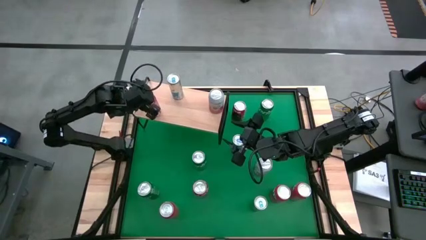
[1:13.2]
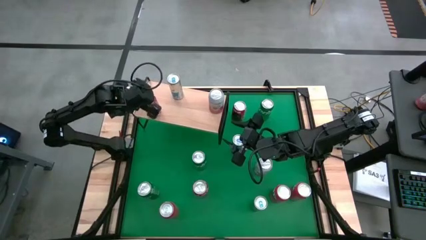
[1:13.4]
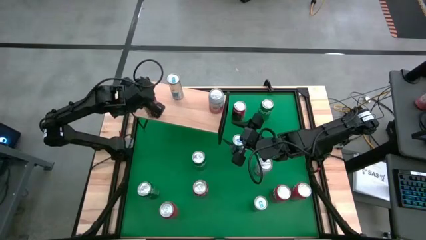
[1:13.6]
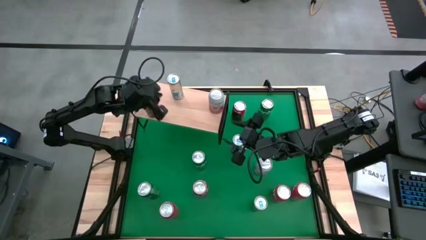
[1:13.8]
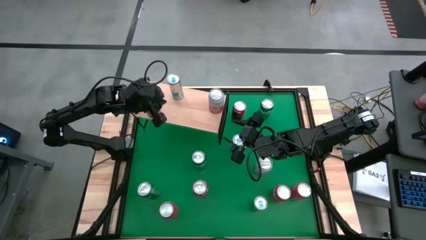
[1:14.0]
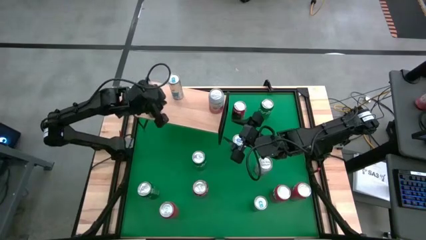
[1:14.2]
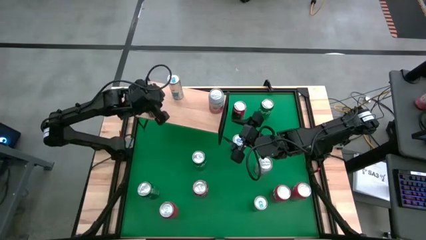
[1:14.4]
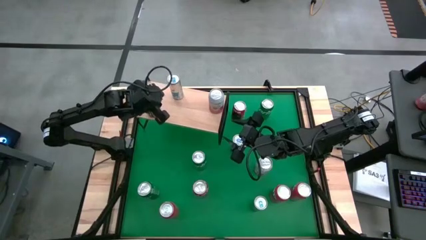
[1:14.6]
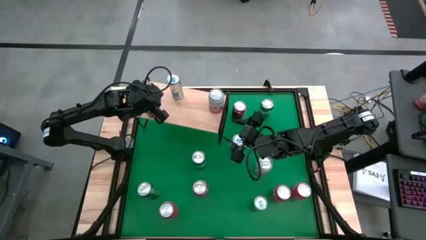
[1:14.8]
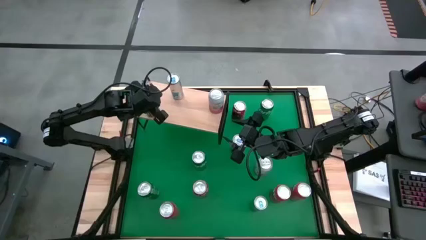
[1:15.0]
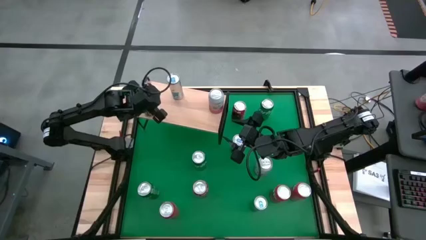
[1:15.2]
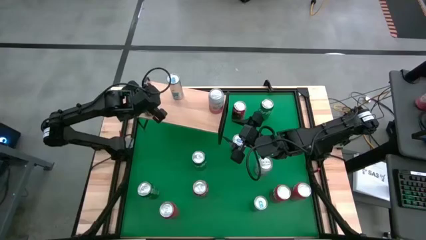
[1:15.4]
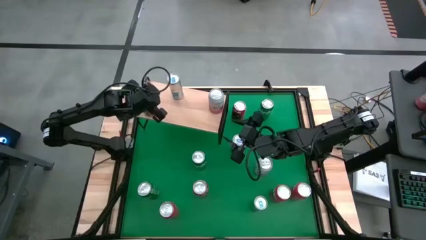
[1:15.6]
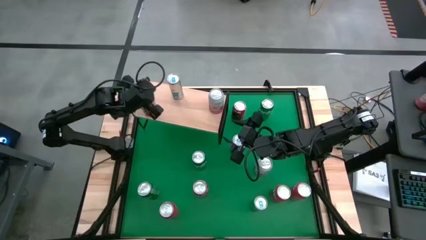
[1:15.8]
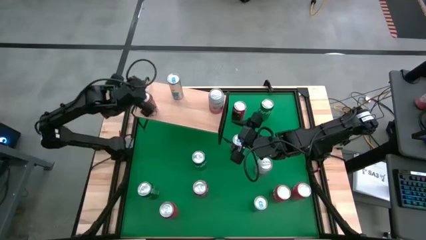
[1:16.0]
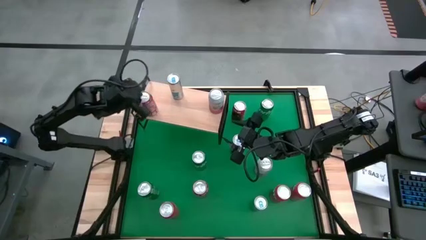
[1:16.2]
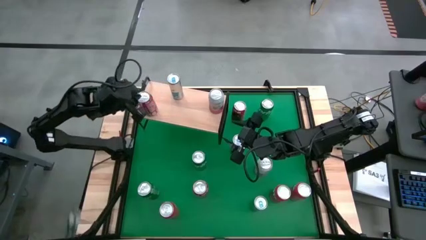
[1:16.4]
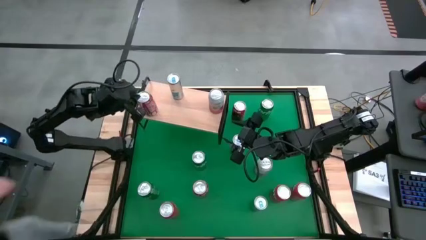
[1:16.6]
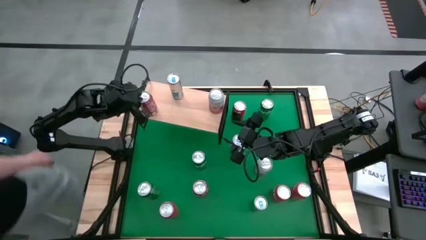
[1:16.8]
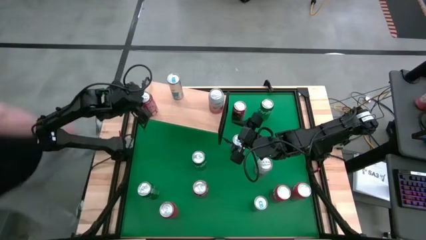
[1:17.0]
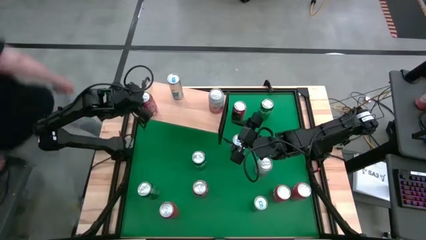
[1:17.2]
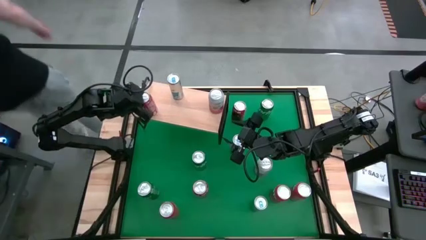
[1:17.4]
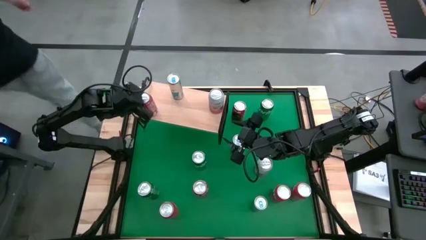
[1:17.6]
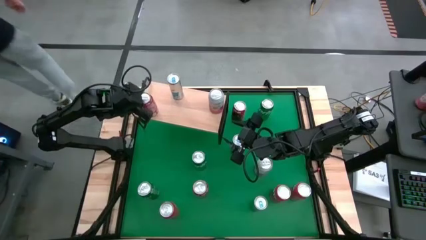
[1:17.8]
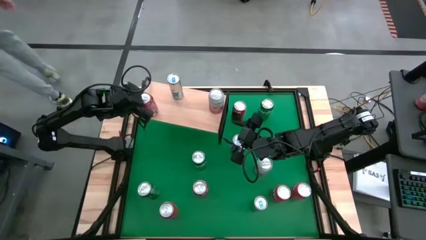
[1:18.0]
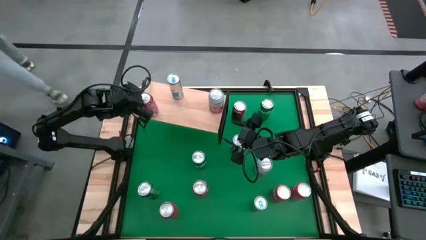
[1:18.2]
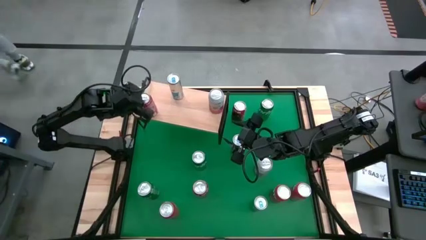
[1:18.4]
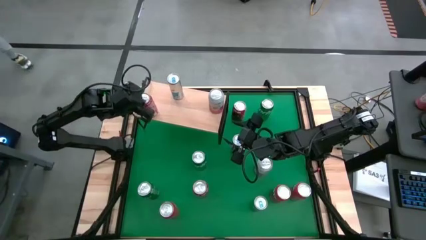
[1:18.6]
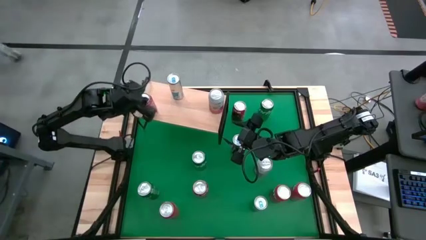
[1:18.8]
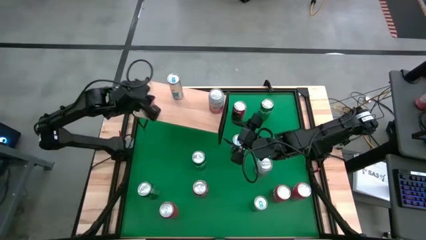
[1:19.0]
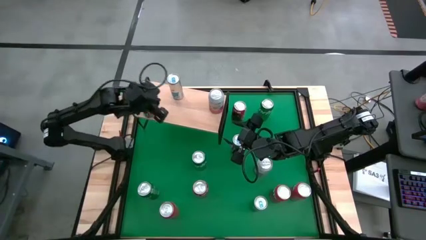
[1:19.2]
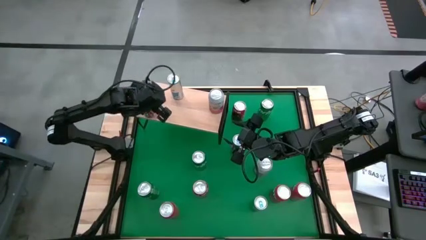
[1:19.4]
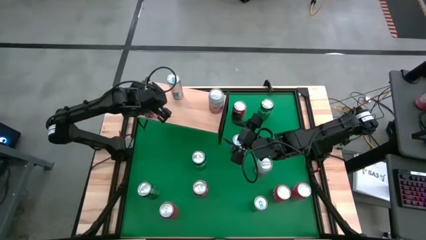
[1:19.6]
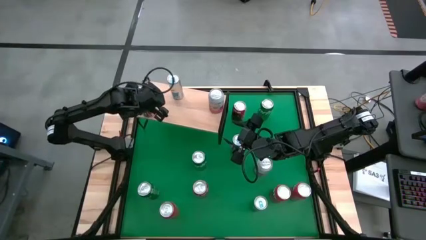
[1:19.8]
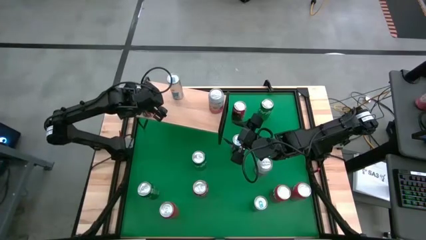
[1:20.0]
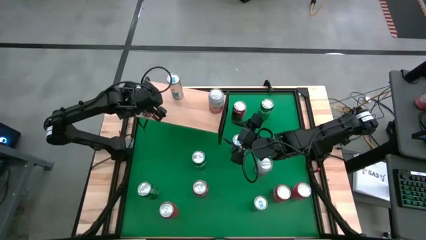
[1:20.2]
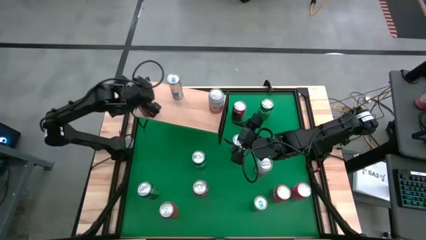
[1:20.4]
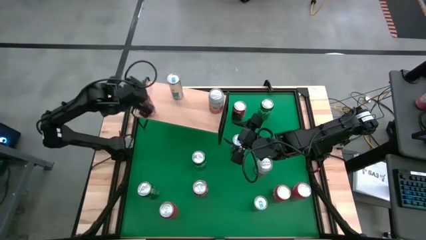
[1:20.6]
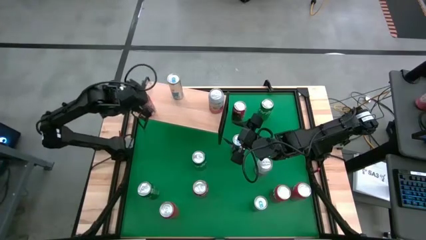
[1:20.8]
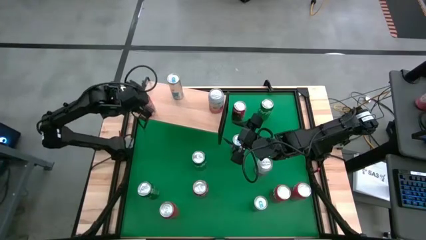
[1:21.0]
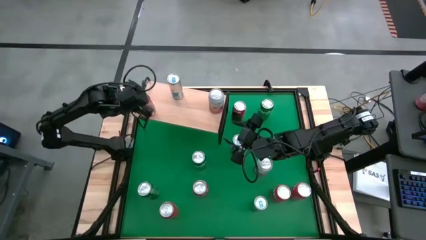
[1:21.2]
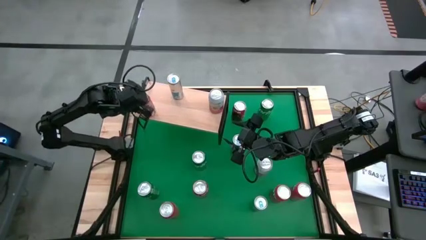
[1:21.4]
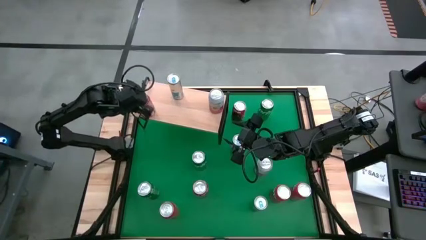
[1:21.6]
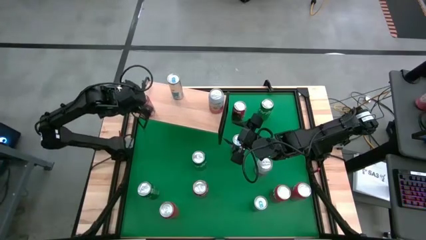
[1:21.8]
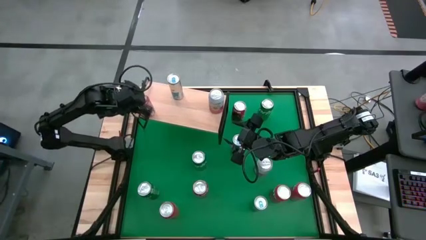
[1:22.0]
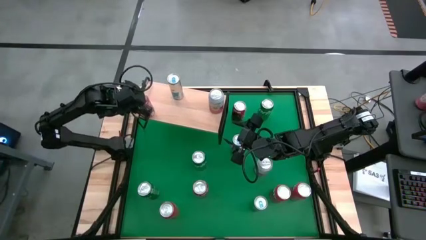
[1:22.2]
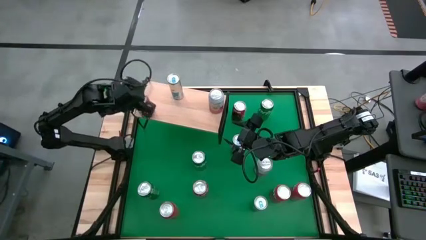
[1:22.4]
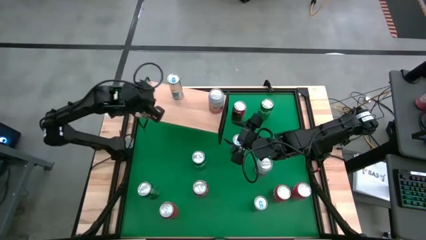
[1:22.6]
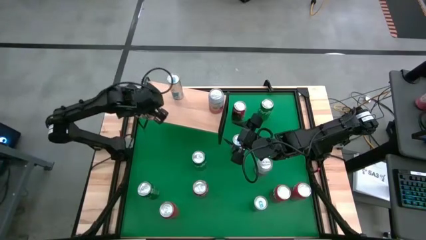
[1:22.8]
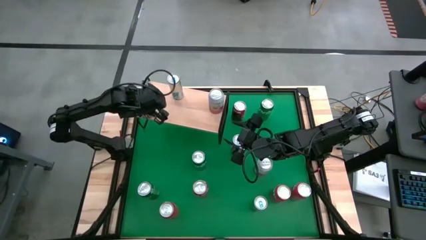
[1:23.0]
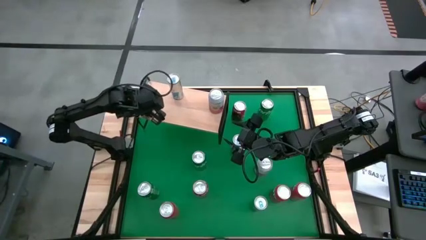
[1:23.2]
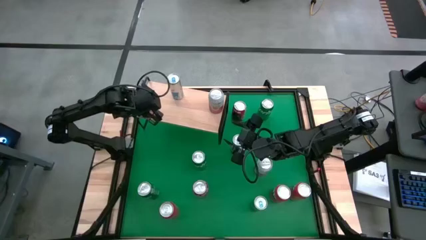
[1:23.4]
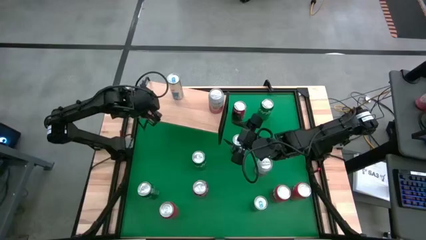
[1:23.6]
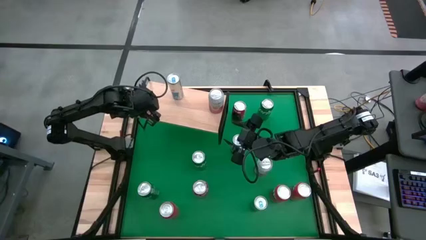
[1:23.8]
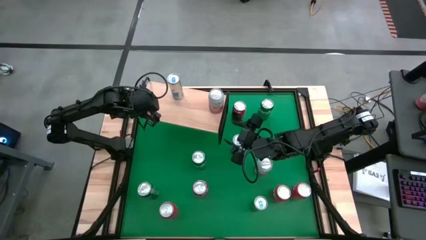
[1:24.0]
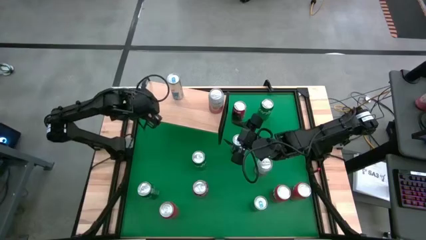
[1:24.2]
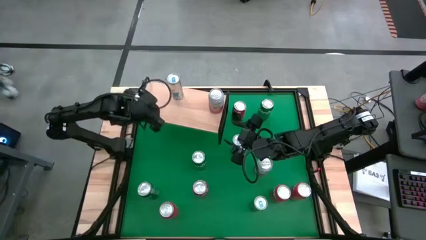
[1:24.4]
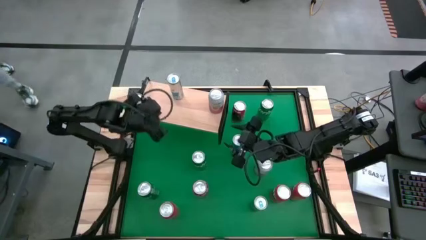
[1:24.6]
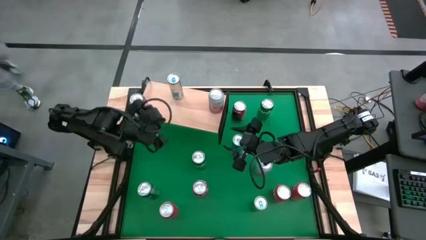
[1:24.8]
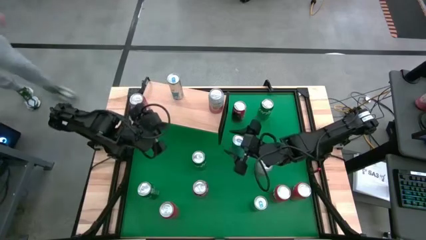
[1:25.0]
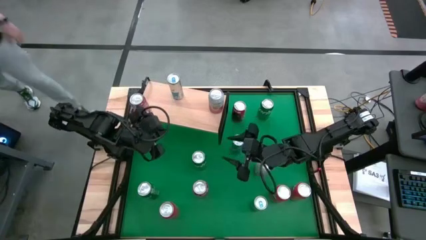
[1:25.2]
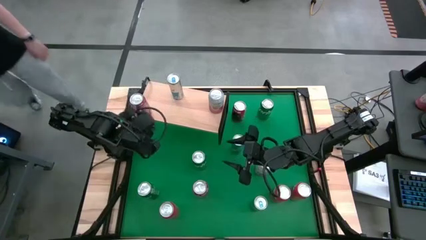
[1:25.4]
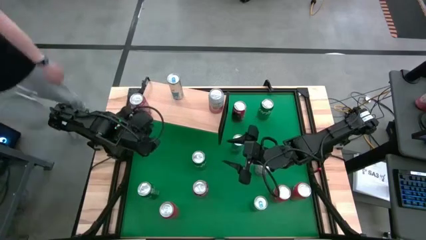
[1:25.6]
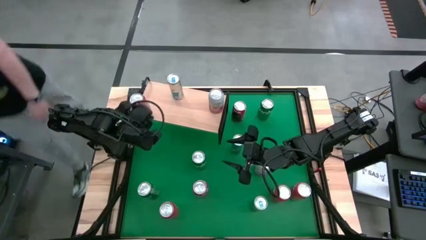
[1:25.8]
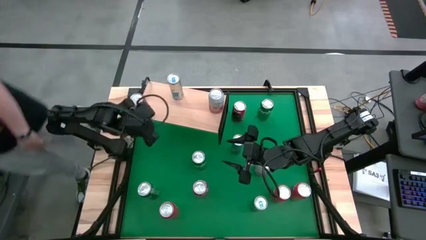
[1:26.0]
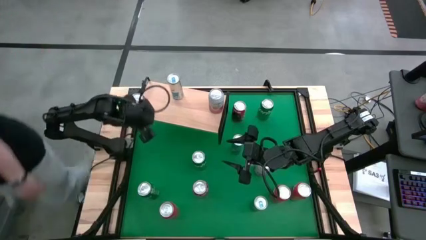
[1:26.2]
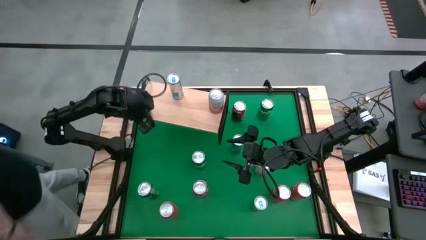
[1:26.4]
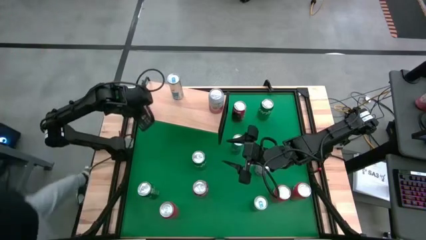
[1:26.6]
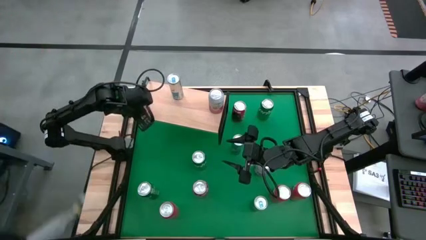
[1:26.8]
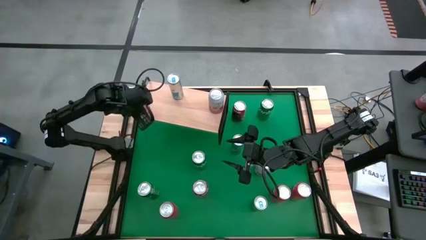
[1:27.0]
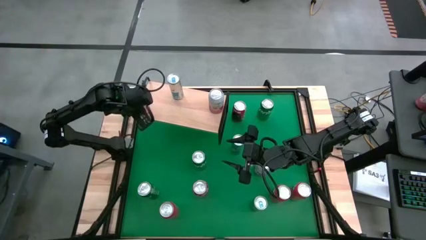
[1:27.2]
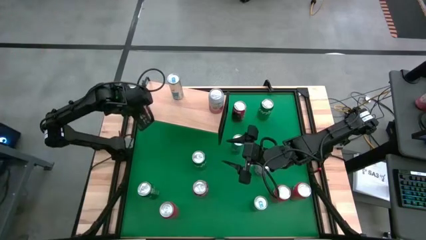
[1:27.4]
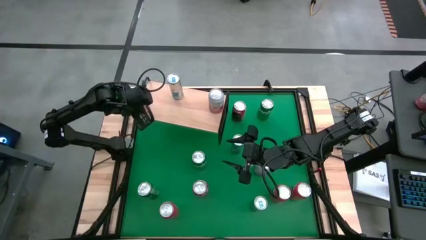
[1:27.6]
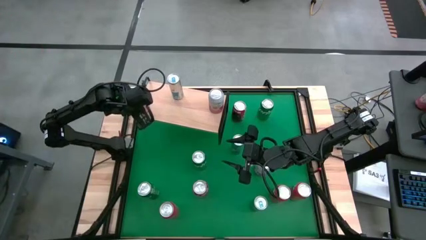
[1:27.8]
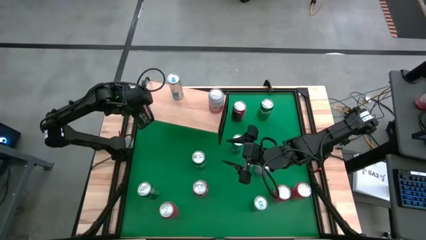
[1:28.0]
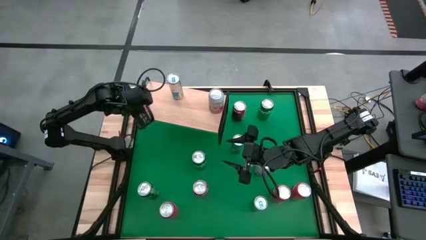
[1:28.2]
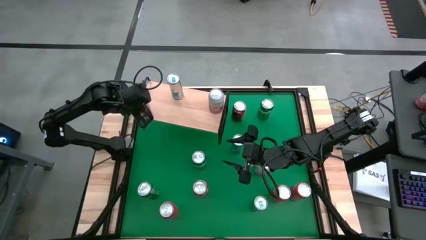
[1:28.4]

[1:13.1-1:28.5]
Task: Place canned beverage on shelf
Put the red/black soda can on the shelf
